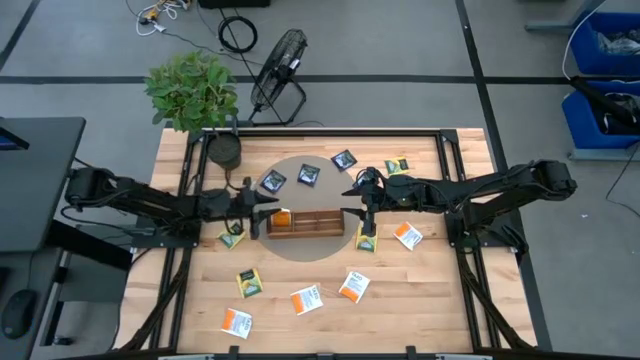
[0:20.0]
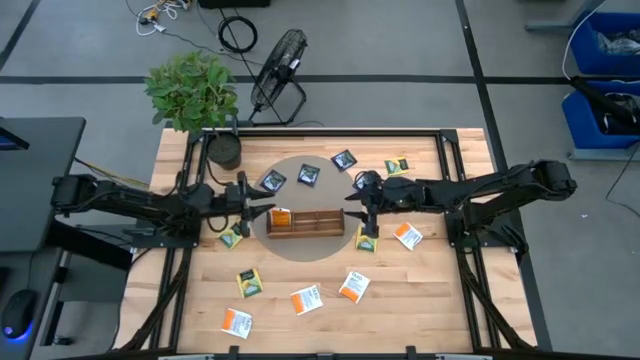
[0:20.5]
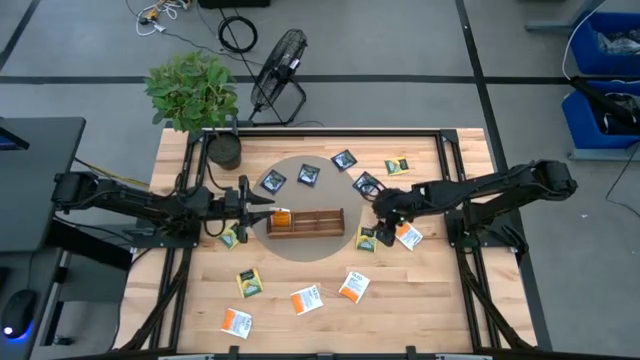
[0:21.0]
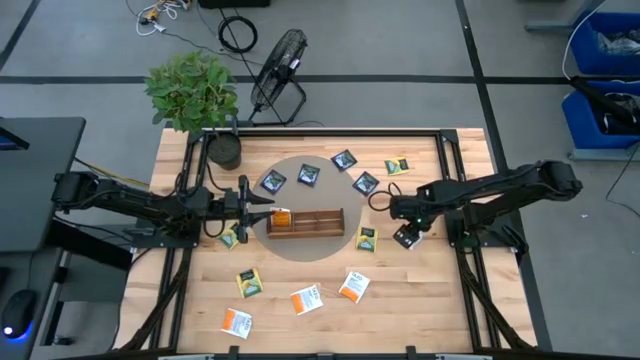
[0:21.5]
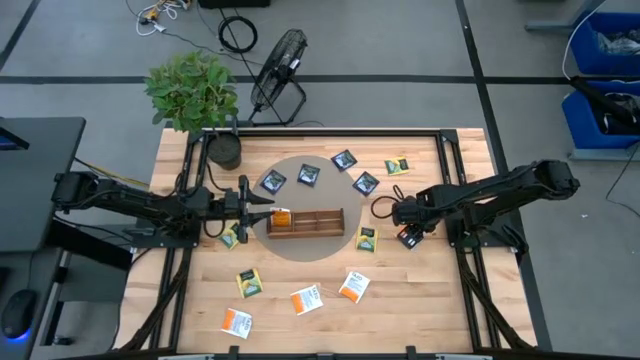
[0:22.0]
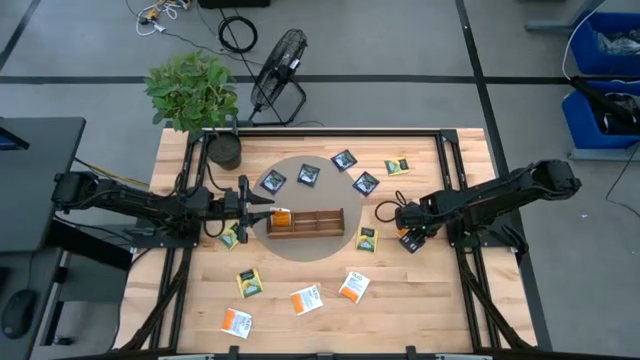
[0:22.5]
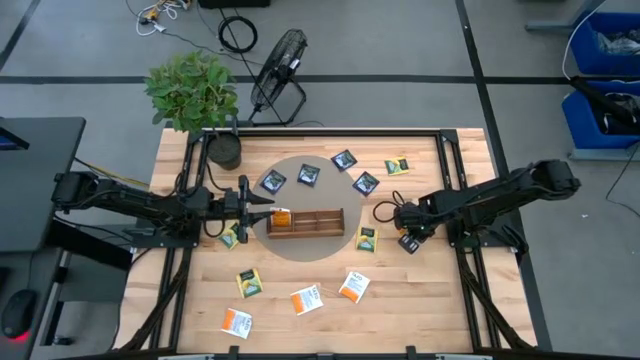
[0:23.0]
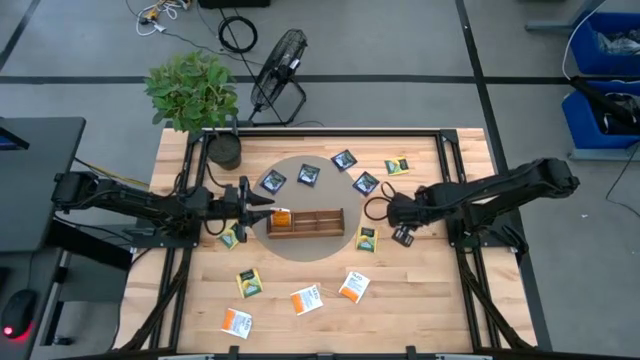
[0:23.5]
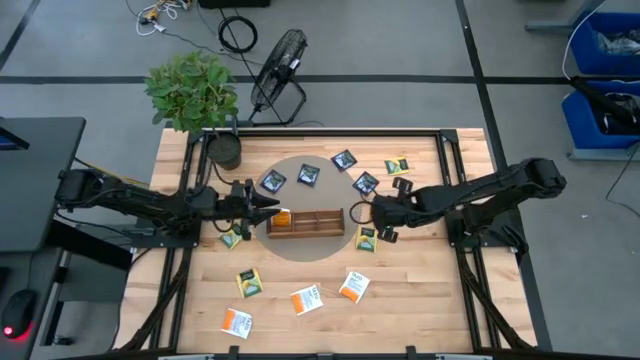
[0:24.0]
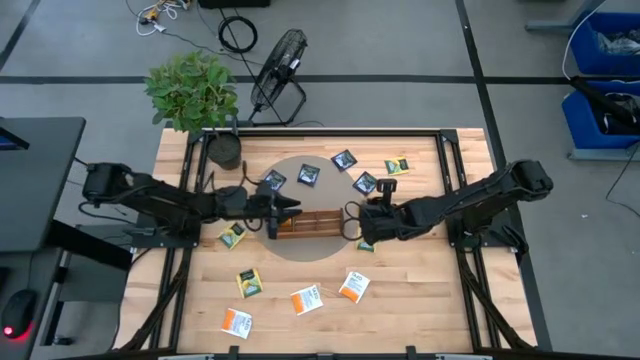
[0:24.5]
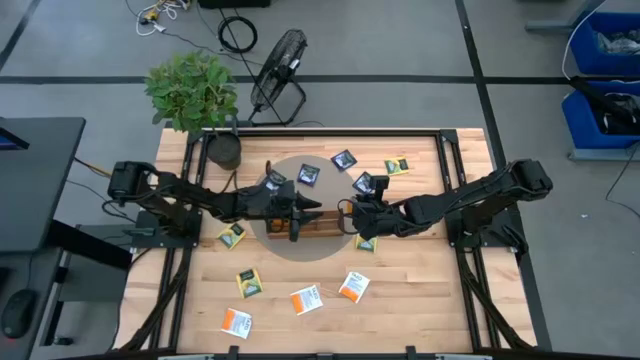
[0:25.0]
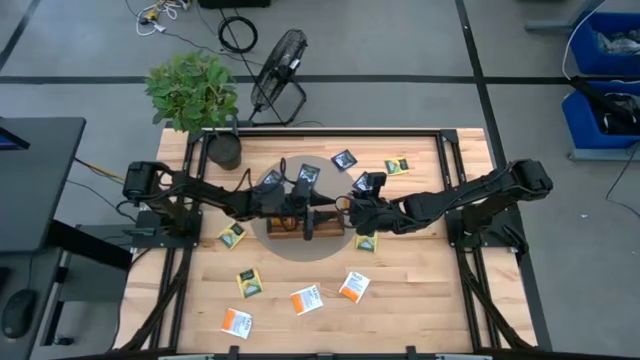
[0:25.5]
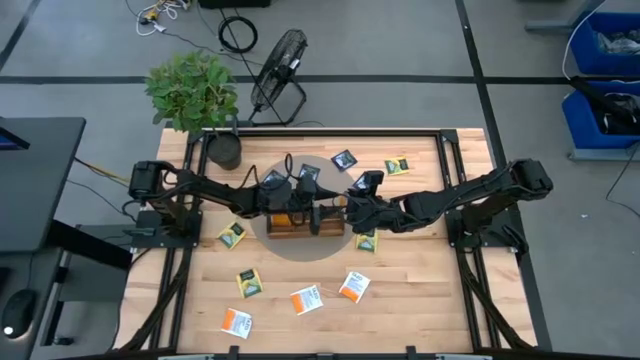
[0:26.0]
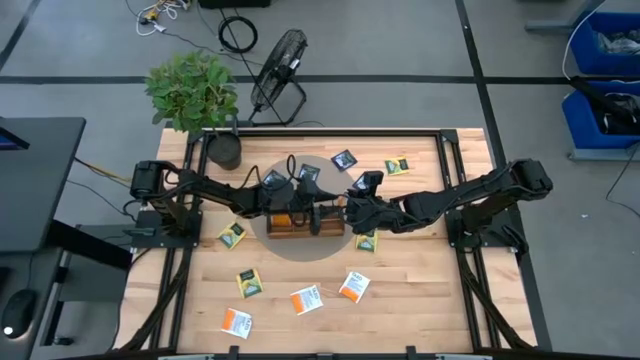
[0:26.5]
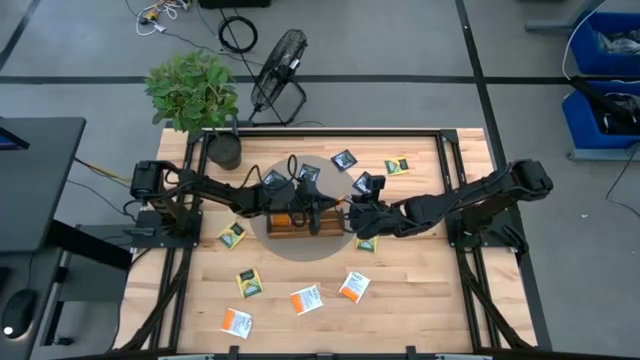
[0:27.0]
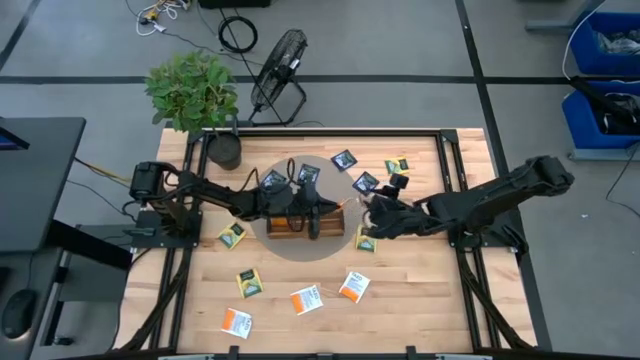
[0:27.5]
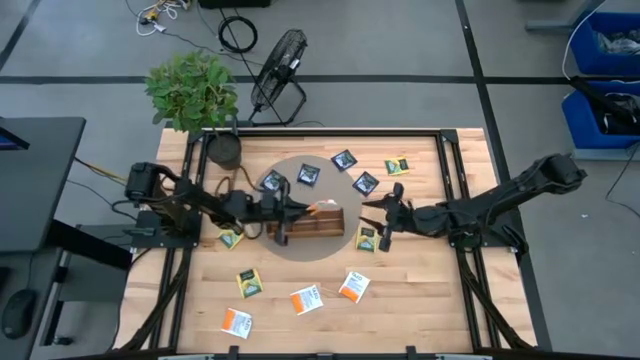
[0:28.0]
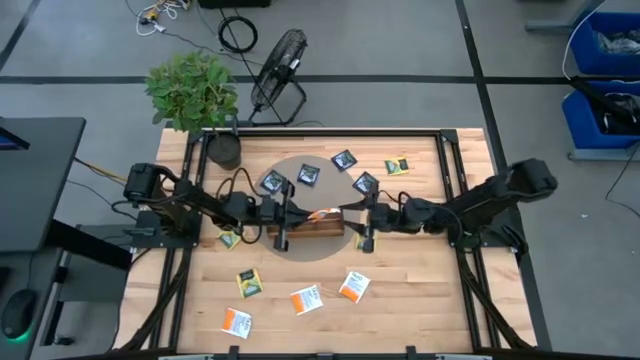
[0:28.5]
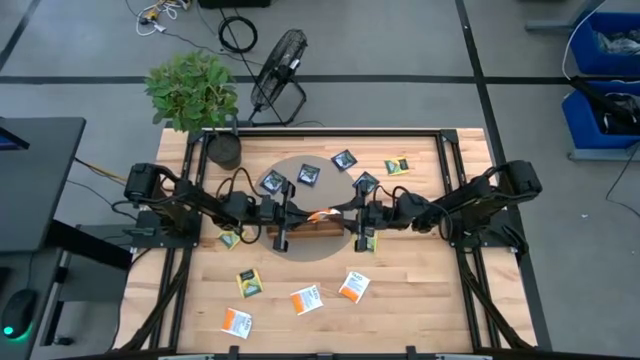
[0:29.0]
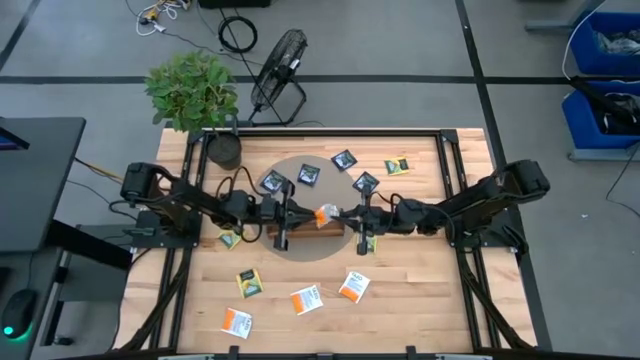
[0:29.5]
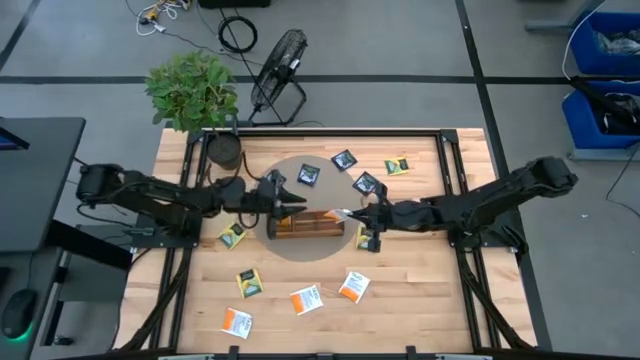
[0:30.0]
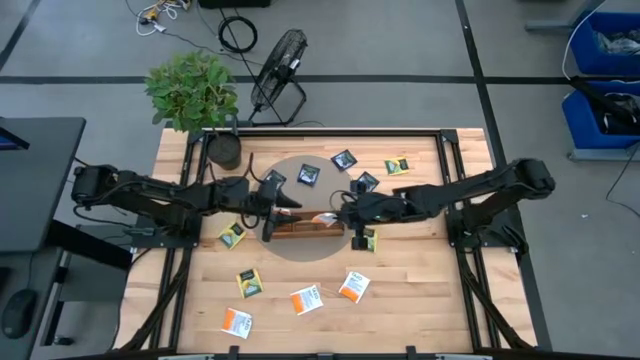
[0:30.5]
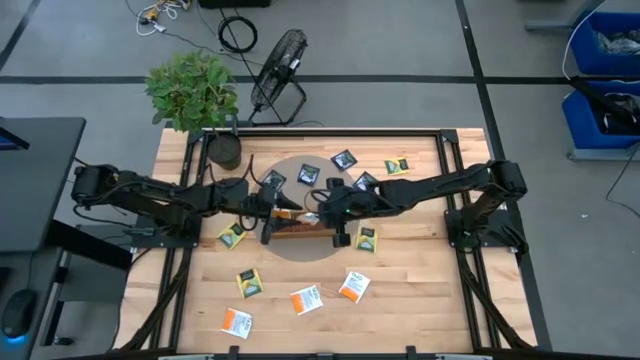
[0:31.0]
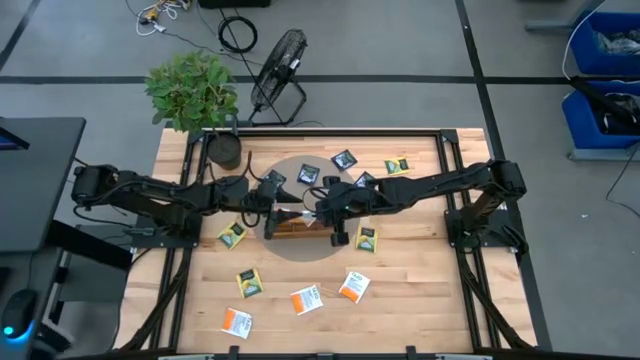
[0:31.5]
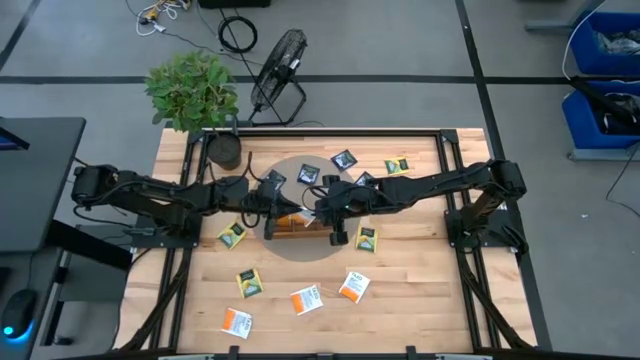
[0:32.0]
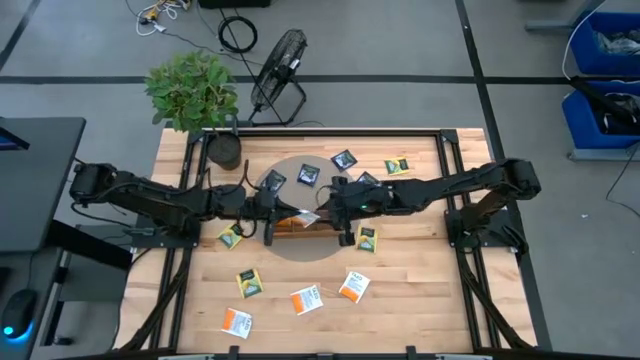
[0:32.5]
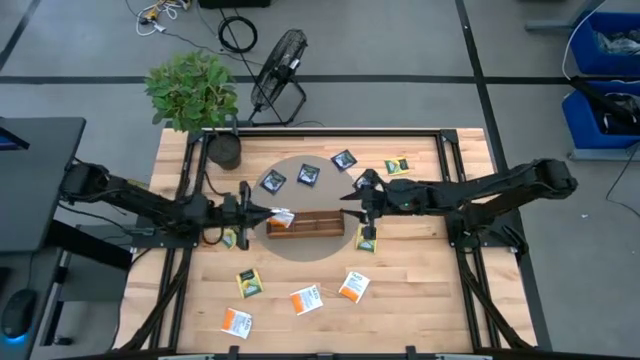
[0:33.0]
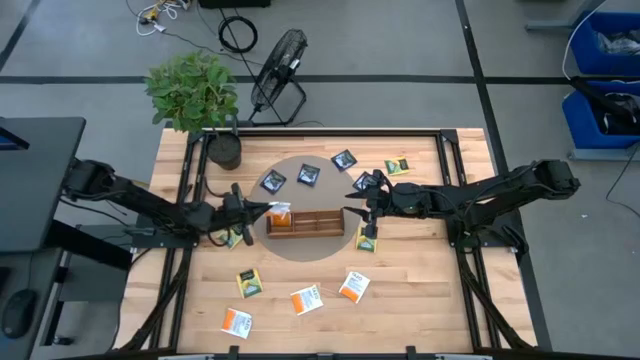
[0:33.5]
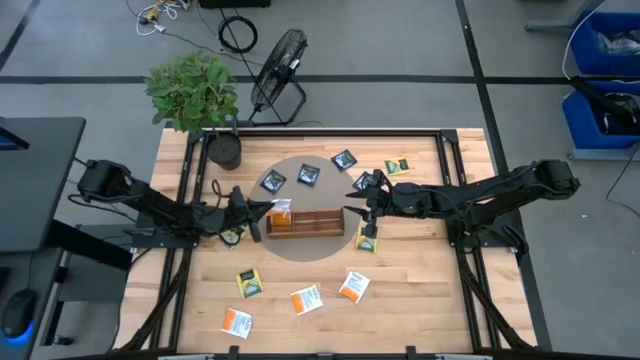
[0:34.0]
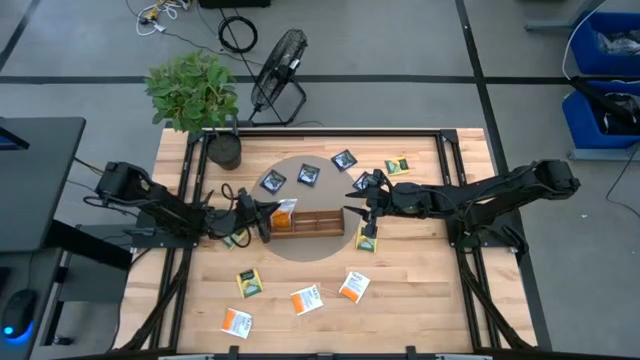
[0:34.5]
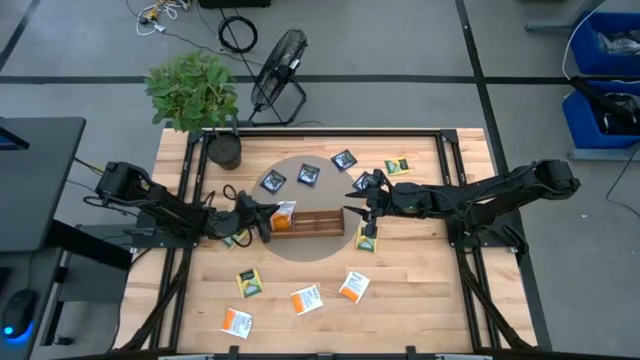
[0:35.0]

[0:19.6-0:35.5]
Task: Pick & Place Tea
Put the orange tea bag into the left compartment of the wooden organizer

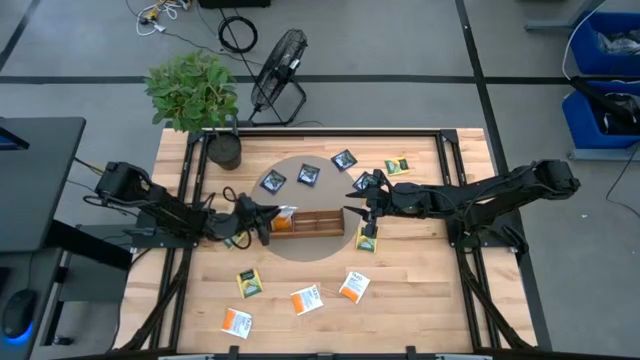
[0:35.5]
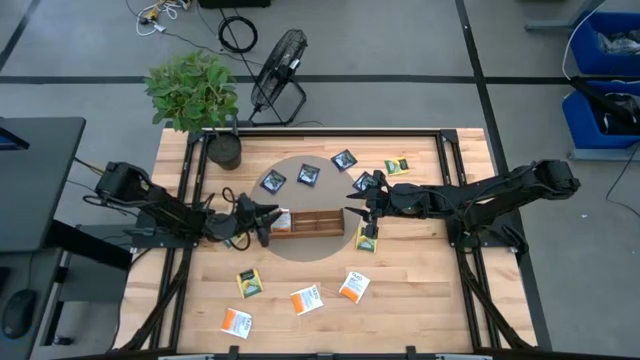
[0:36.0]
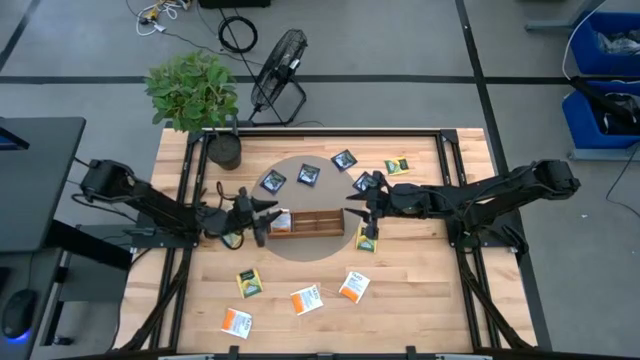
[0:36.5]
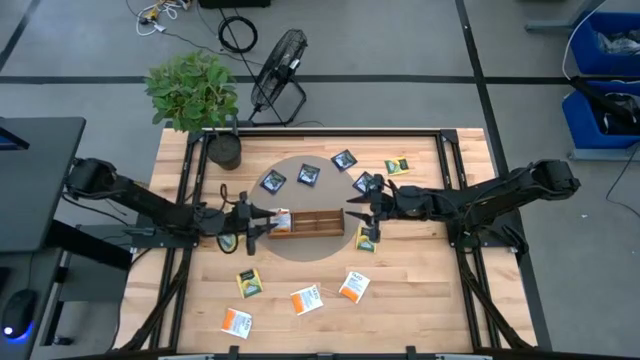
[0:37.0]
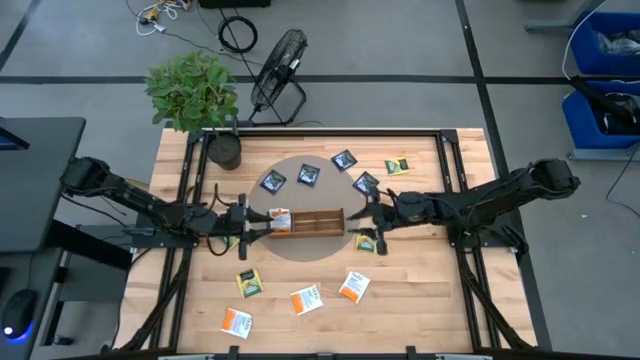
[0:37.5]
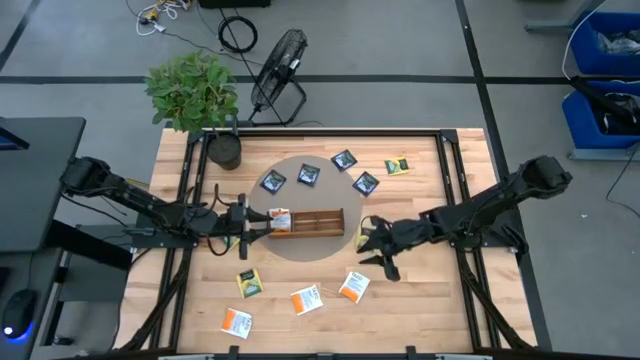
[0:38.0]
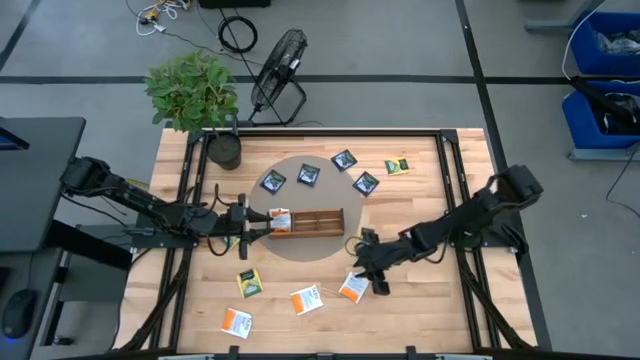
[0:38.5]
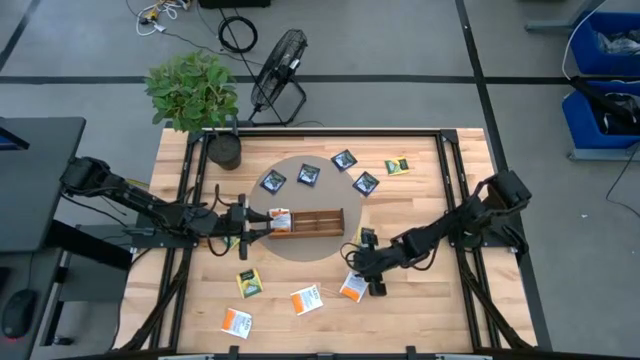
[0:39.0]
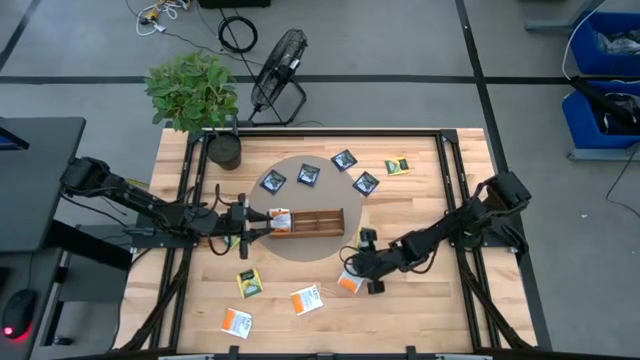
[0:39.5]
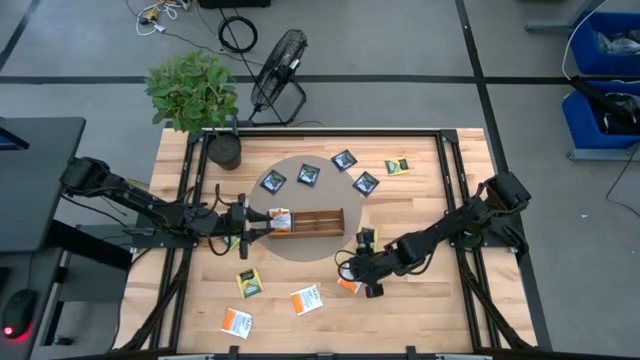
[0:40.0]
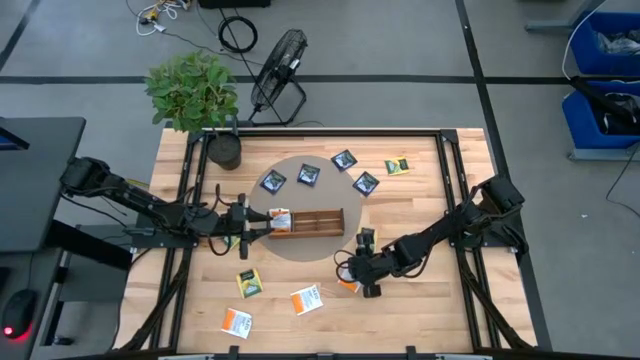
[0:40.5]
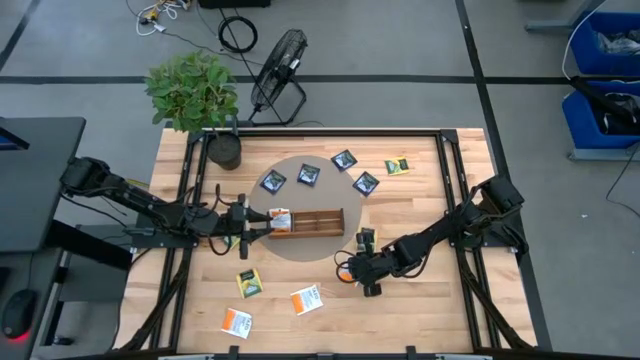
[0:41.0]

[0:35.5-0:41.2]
Put the bottom right orange tea bag into the left compartment of the wooden organizer
